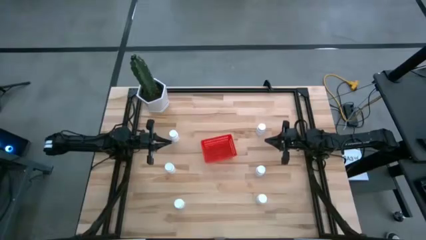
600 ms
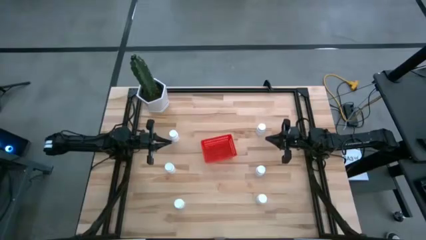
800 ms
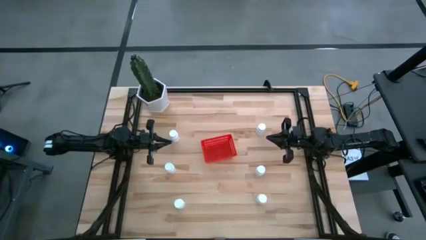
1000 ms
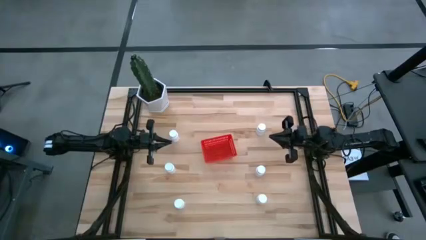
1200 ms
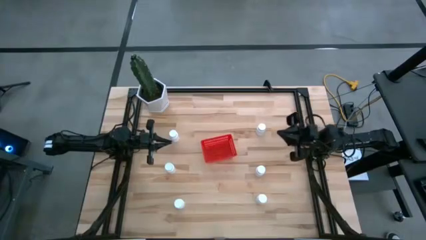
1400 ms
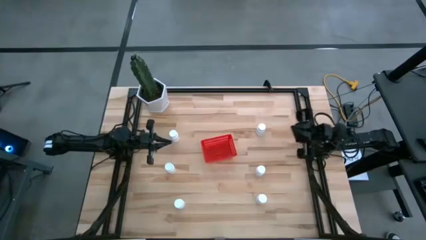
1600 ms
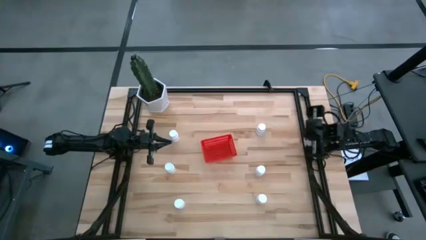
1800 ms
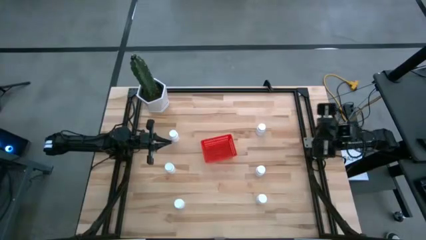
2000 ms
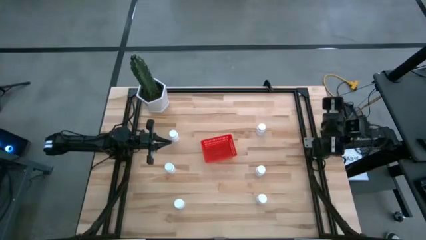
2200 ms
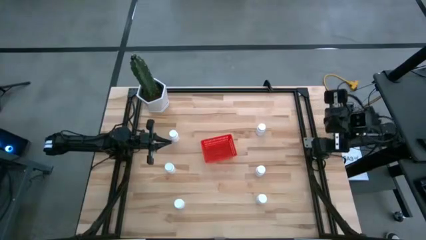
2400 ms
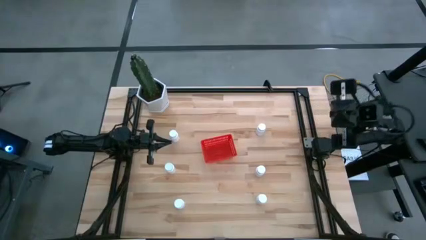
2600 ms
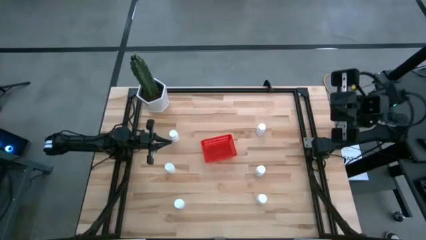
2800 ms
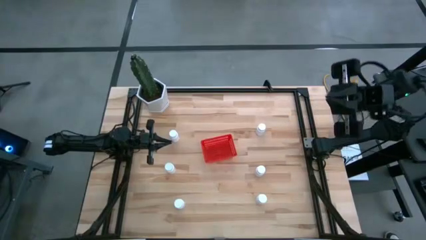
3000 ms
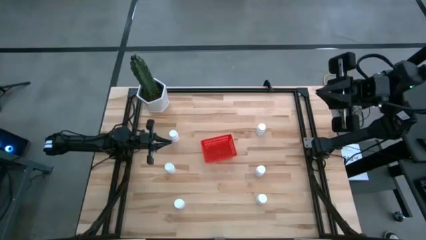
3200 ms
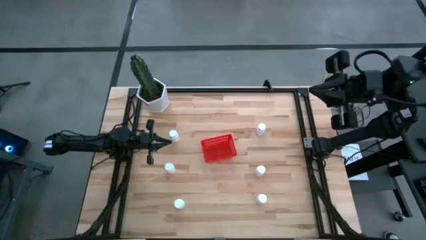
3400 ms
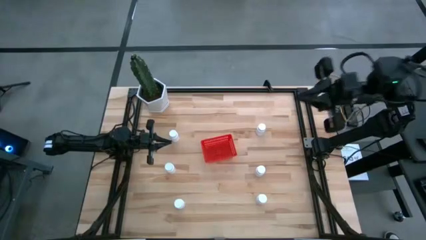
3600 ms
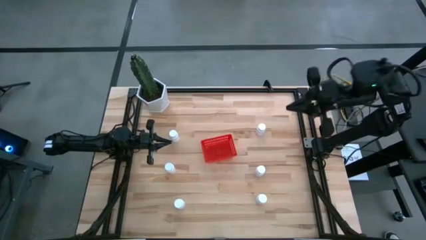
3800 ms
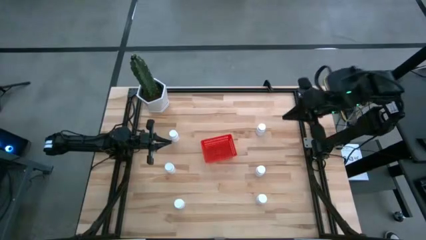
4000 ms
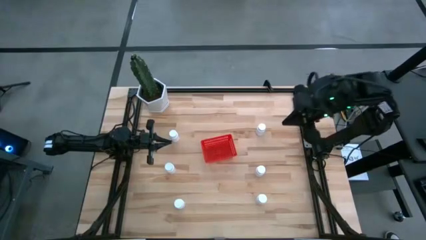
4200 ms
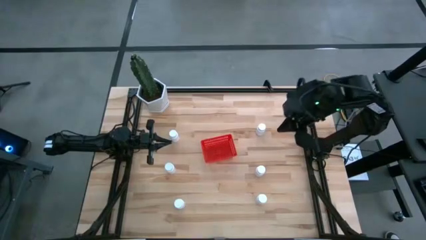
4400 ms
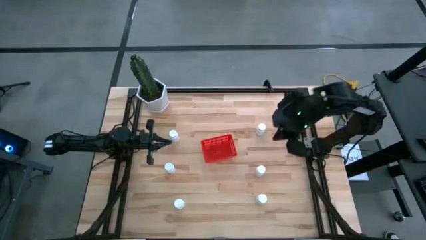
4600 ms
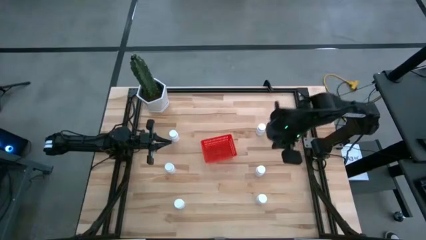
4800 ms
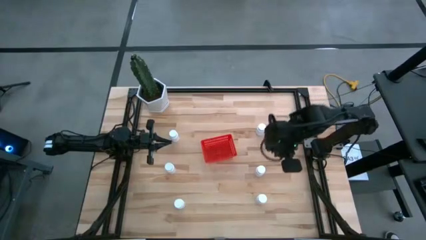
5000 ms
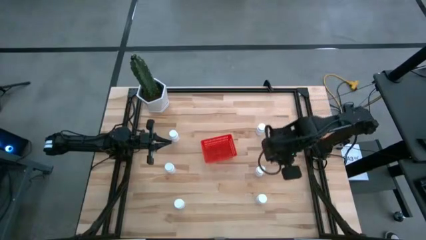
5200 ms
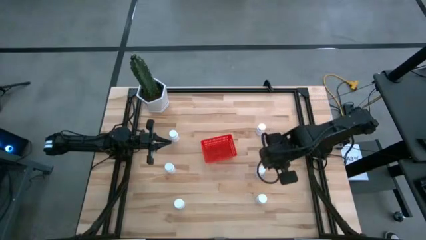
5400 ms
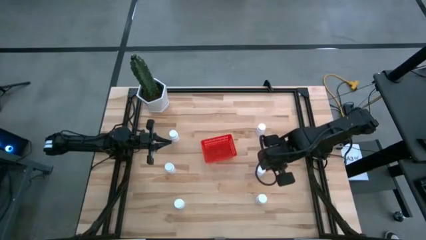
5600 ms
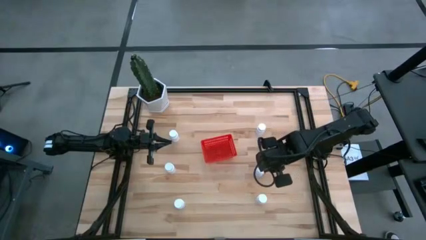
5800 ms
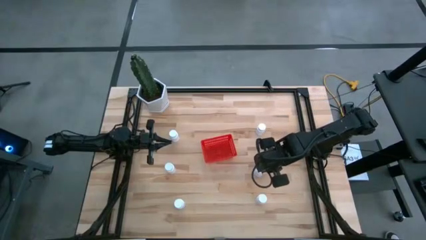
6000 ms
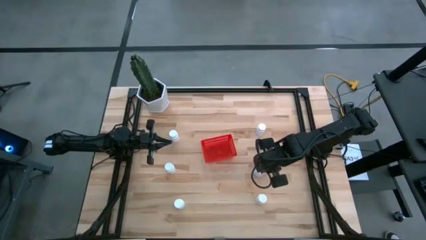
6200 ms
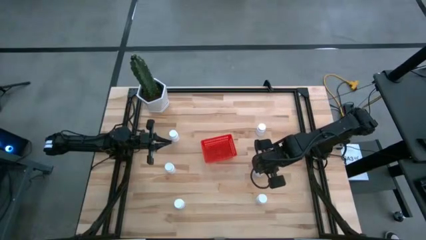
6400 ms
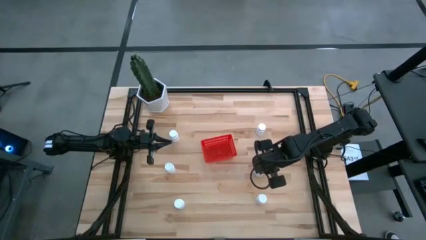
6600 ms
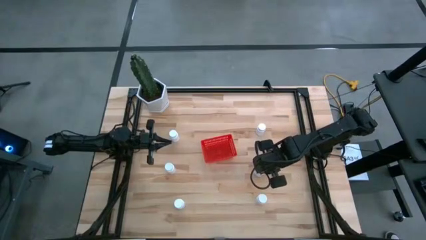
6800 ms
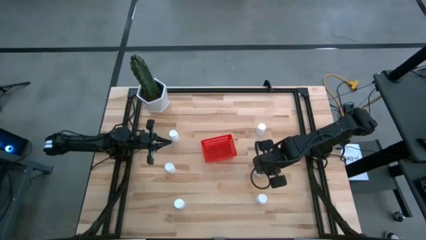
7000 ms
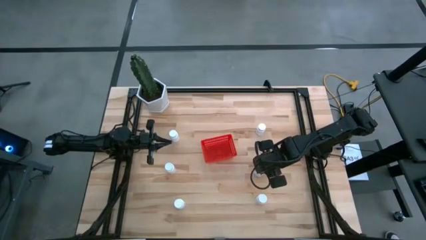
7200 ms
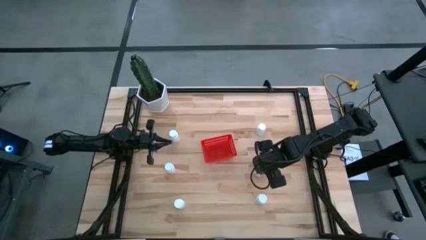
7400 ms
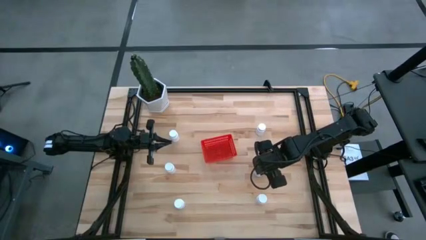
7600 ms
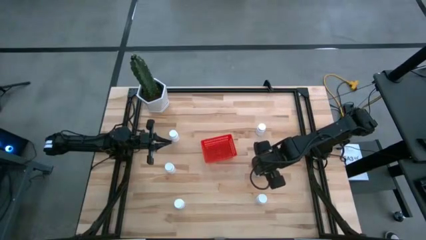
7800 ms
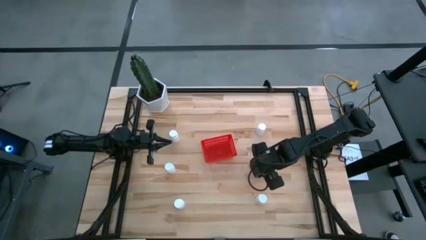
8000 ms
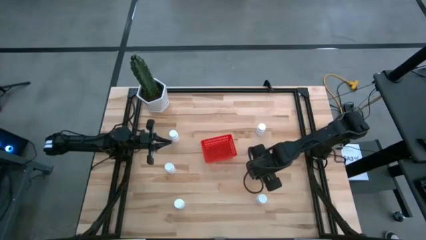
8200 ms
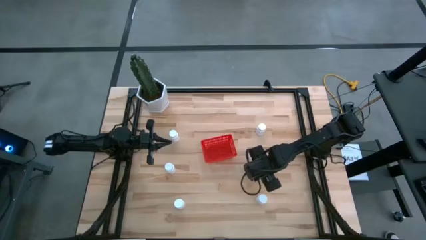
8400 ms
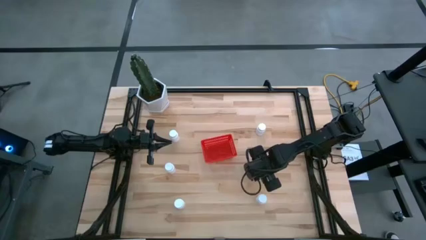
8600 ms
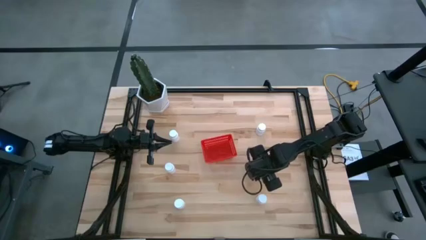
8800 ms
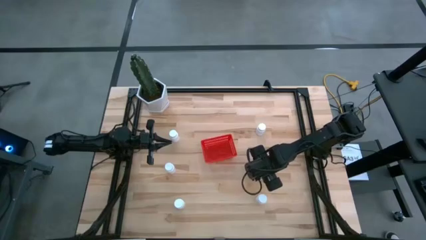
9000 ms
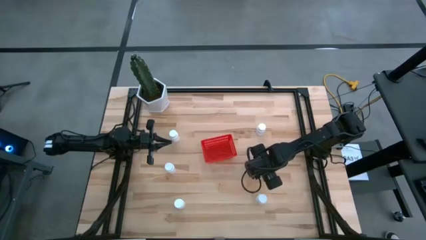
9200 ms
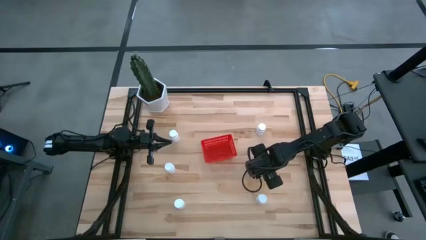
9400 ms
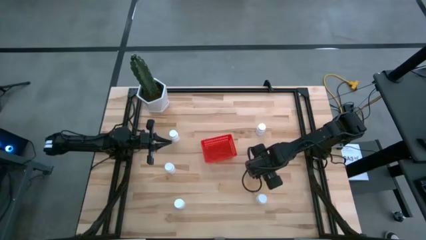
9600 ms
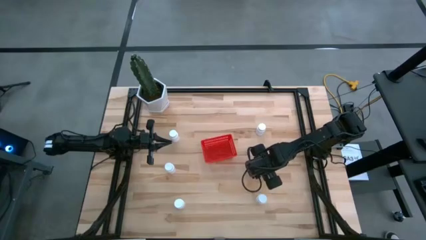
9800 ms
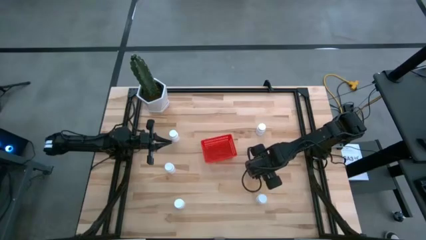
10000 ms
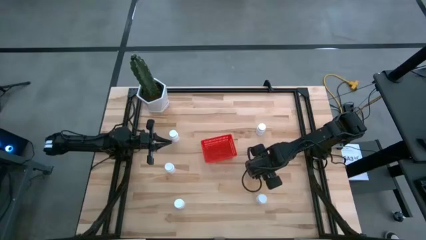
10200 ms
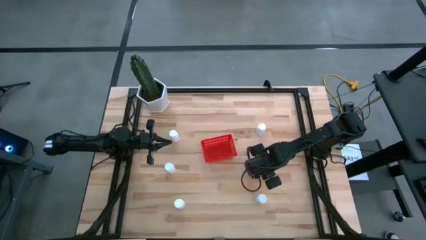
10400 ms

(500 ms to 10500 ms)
Task: Pick and place pill bottles into a basket
Put the white pill bottle into the red bin

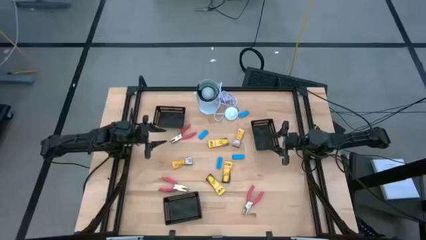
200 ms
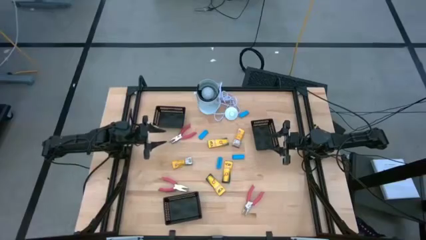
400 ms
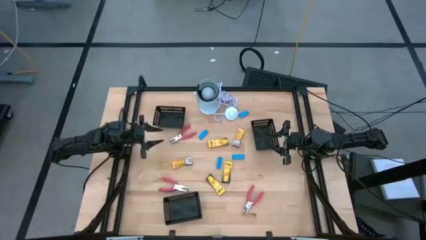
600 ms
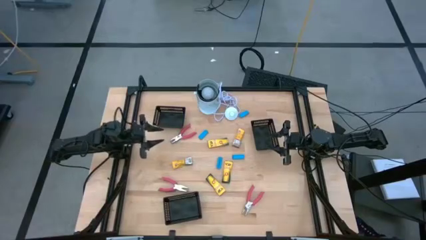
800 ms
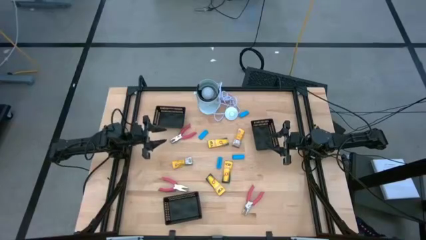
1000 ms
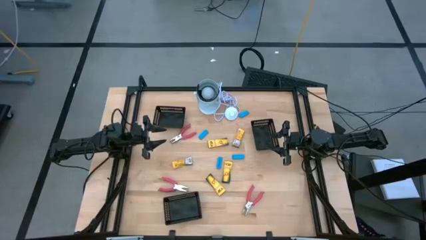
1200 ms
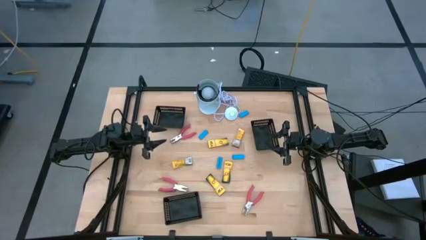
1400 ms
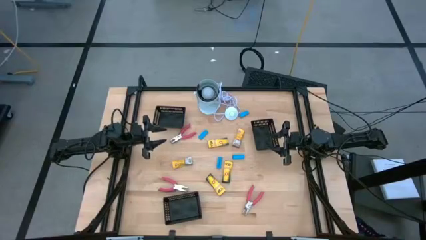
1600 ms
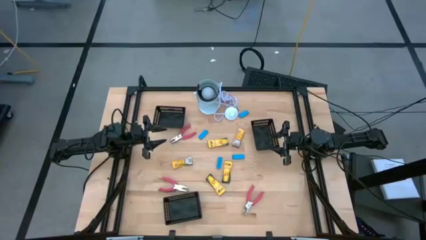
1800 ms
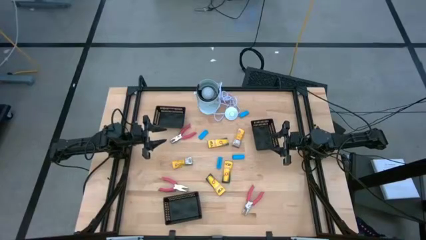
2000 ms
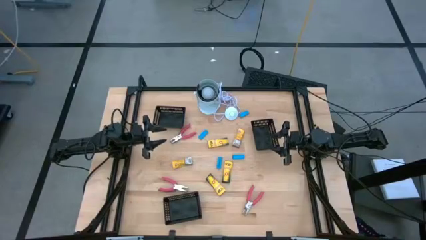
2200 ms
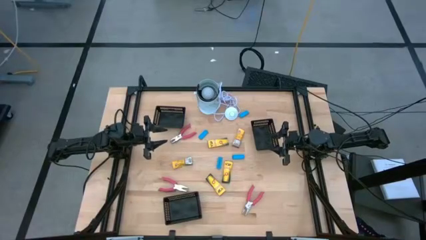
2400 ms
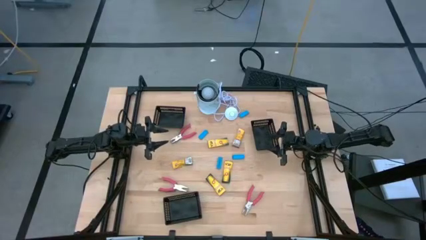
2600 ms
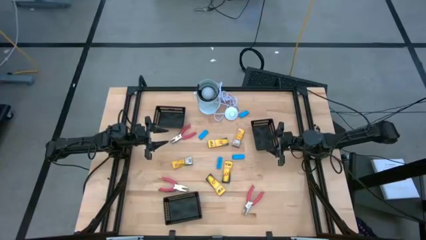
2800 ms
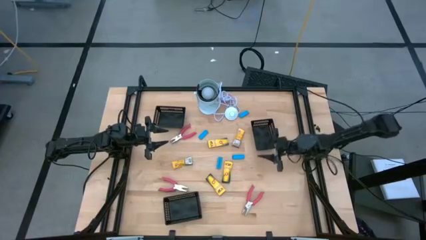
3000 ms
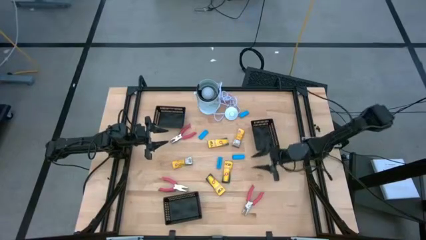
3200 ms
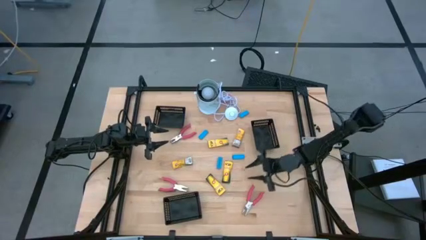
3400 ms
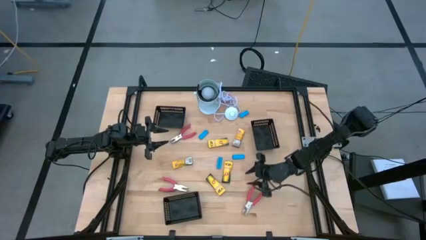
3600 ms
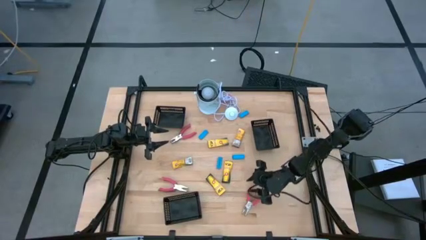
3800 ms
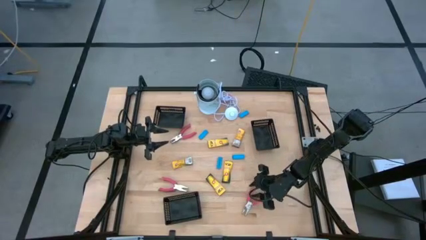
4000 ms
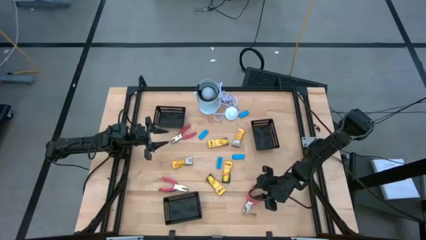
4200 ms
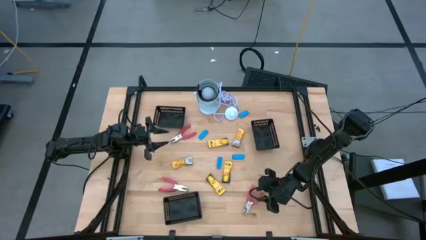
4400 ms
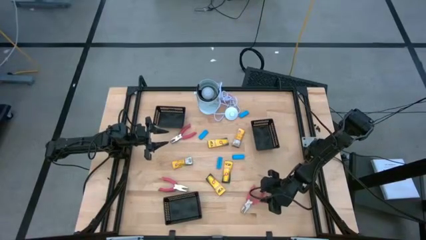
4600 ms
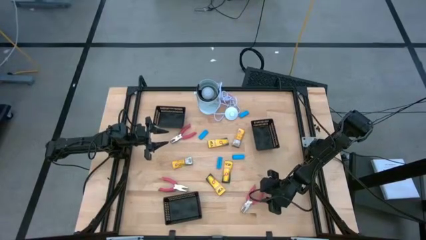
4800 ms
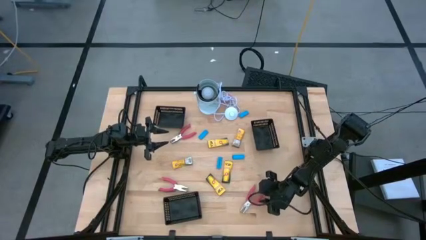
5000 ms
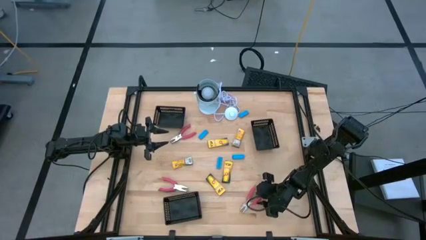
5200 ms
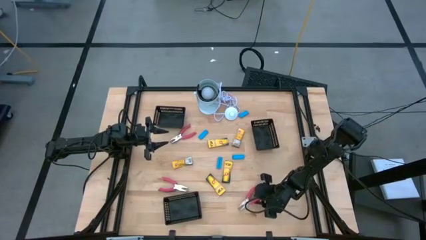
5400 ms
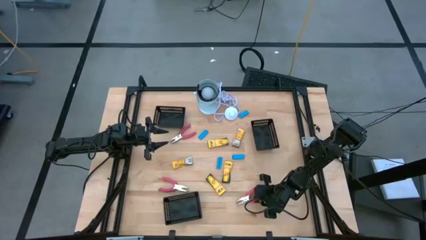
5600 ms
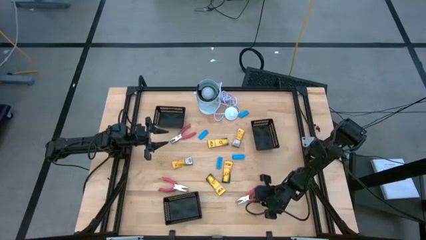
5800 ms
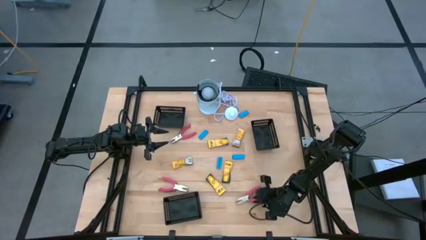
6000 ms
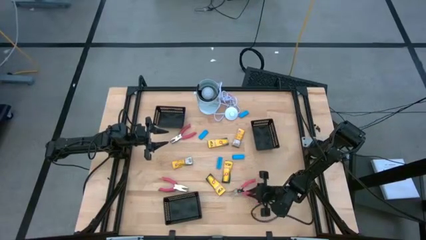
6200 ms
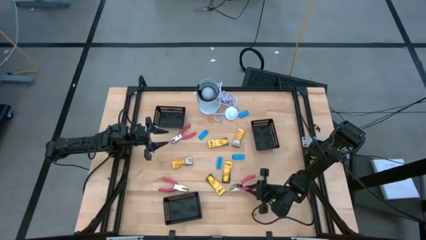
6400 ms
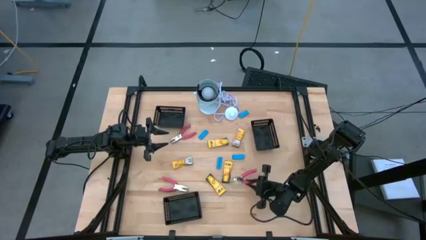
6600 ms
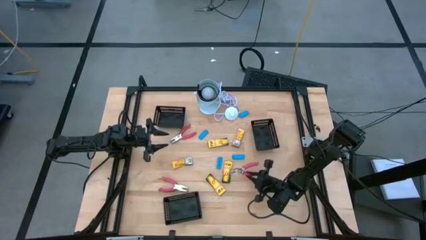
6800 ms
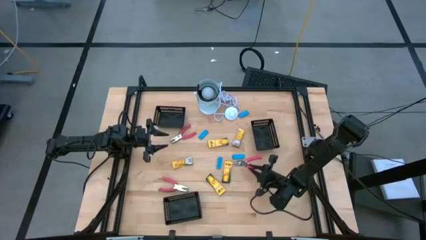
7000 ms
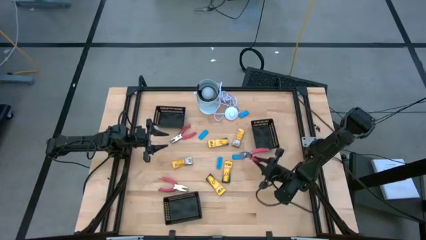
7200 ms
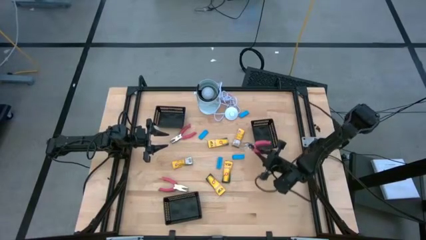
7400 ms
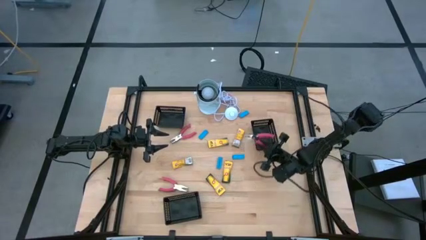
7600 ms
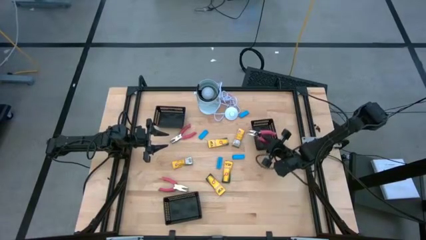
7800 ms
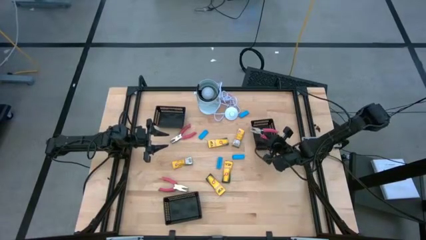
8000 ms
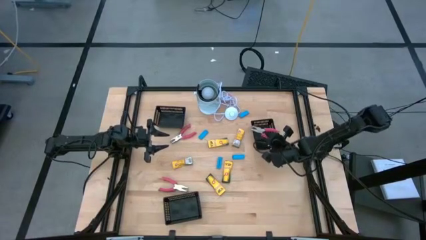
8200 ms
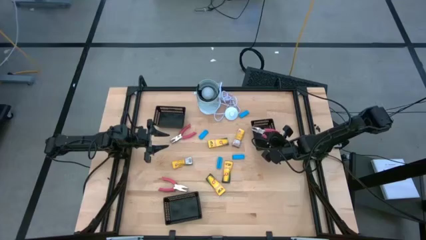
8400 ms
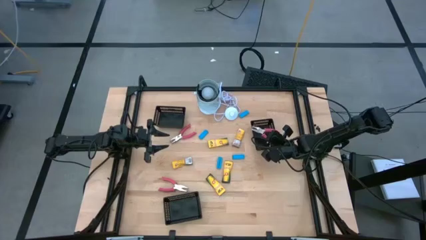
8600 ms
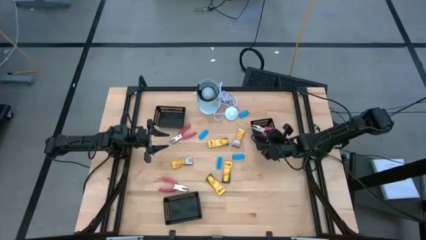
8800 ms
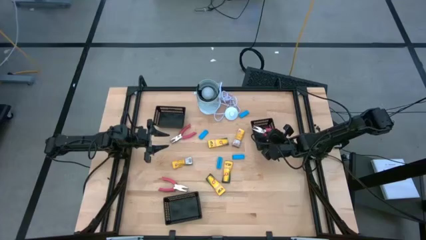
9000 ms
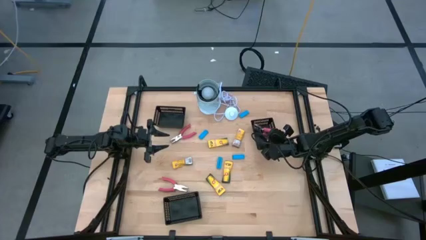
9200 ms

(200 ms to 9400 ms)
Task: Pick & Place School Supplies
Put the pink puncher into the right black bin
